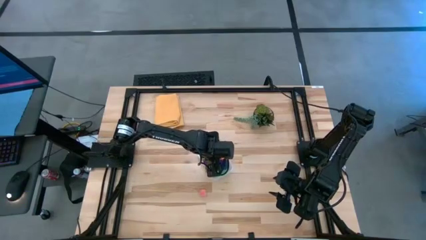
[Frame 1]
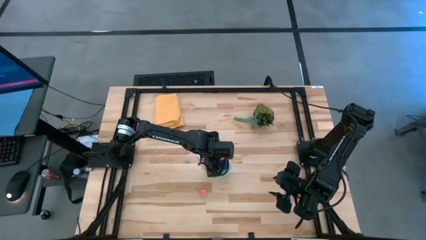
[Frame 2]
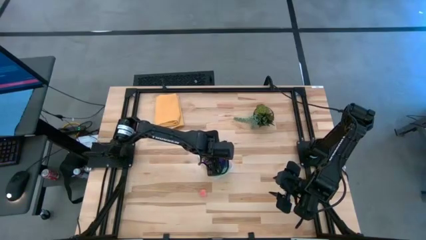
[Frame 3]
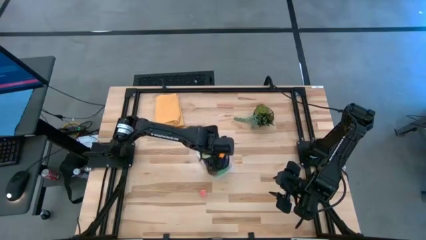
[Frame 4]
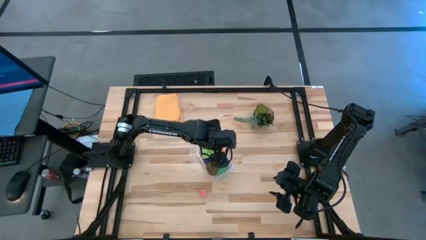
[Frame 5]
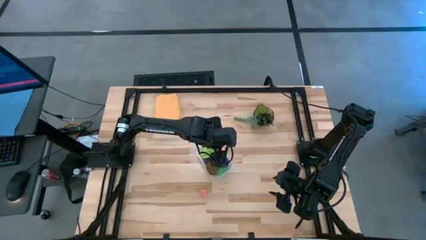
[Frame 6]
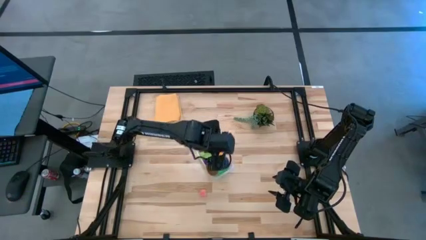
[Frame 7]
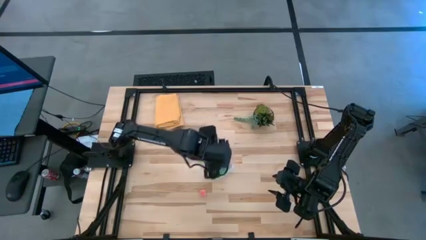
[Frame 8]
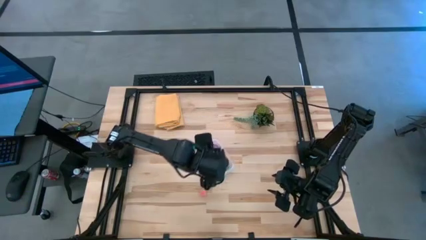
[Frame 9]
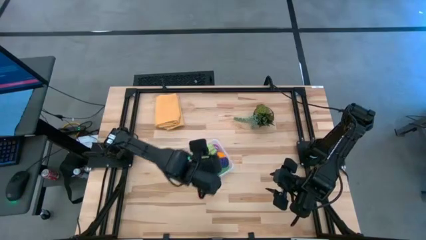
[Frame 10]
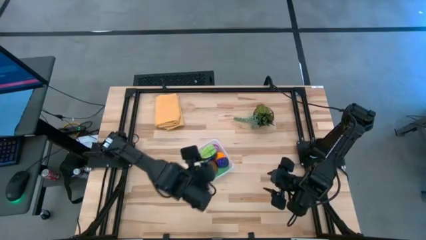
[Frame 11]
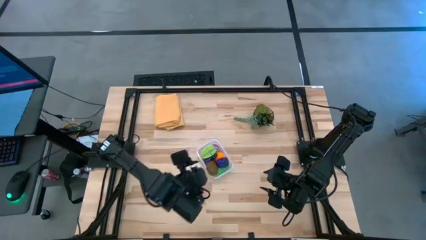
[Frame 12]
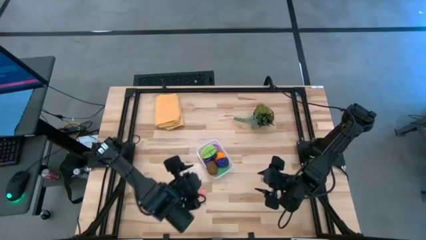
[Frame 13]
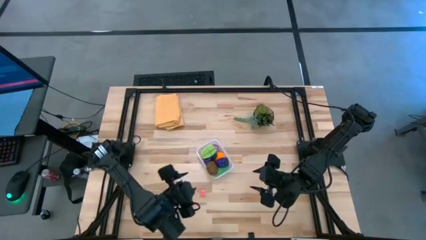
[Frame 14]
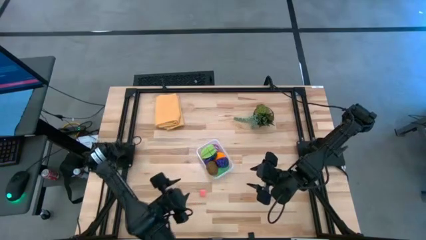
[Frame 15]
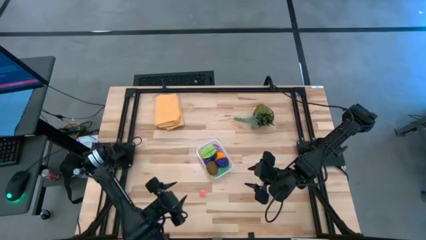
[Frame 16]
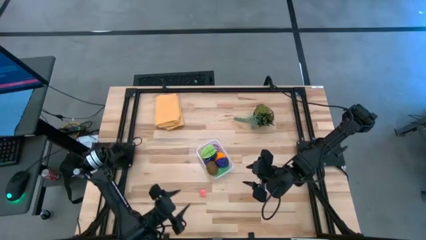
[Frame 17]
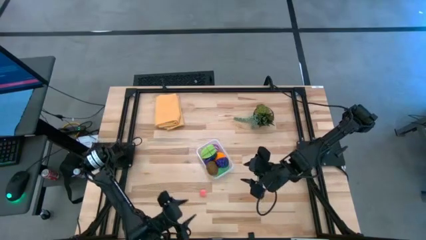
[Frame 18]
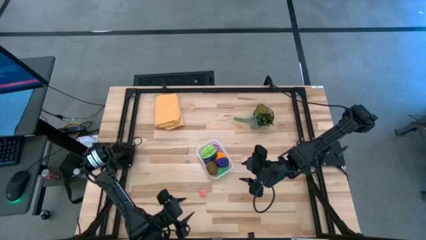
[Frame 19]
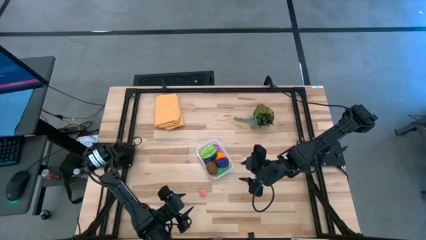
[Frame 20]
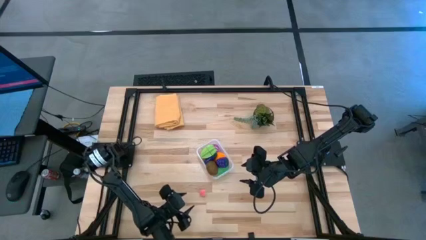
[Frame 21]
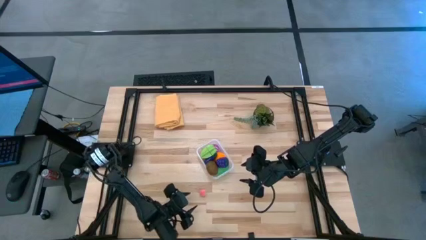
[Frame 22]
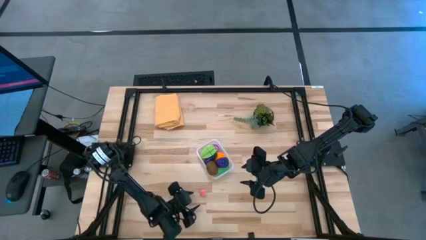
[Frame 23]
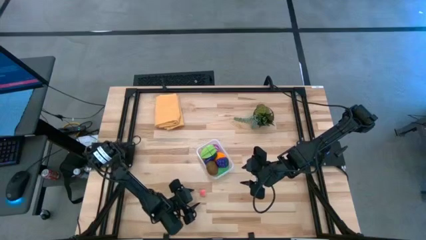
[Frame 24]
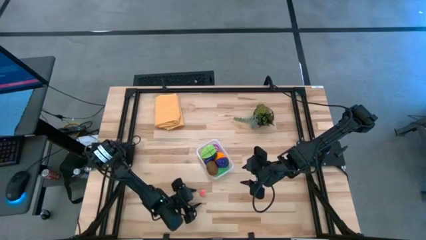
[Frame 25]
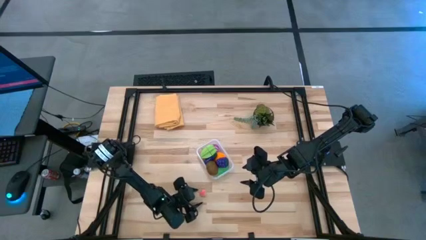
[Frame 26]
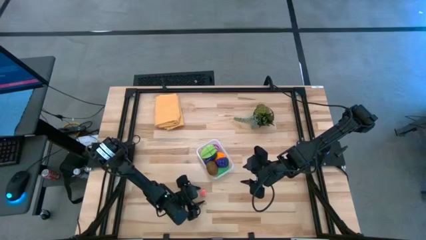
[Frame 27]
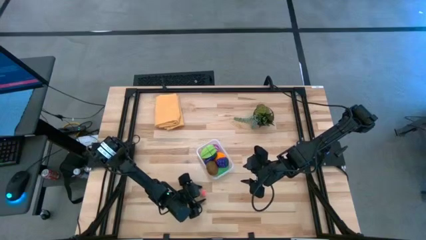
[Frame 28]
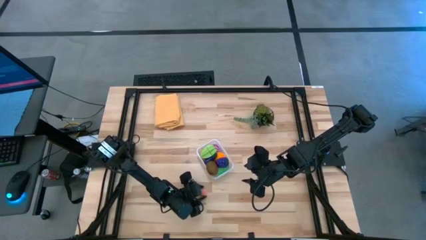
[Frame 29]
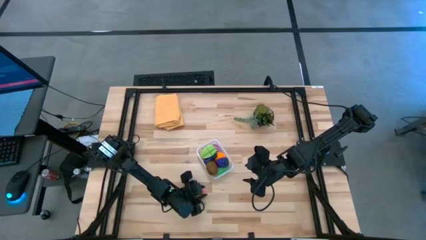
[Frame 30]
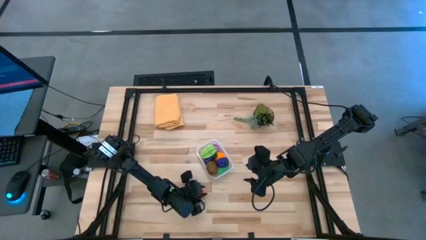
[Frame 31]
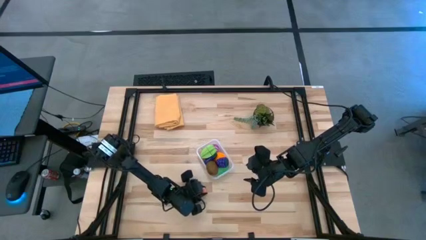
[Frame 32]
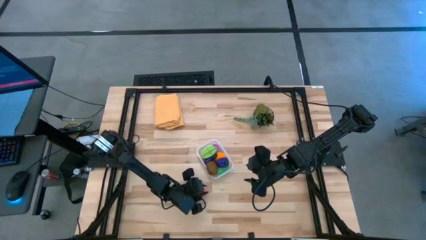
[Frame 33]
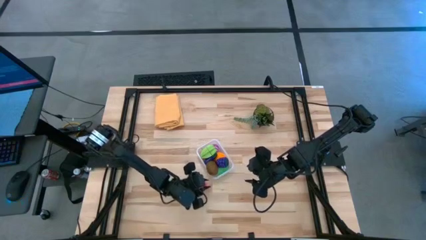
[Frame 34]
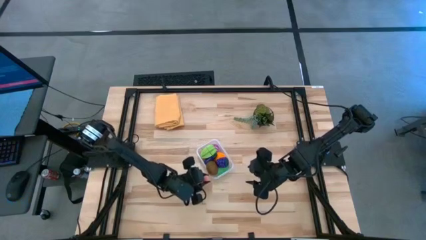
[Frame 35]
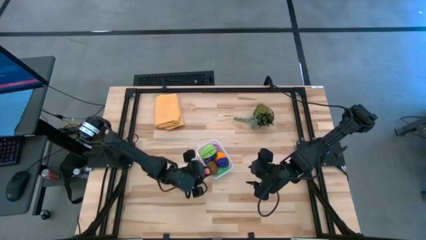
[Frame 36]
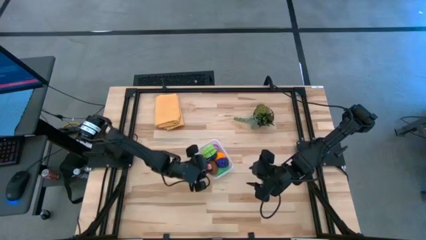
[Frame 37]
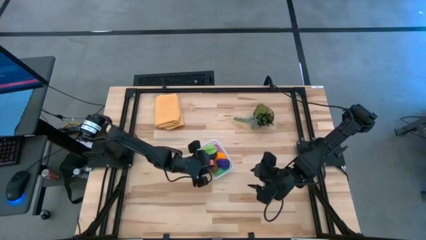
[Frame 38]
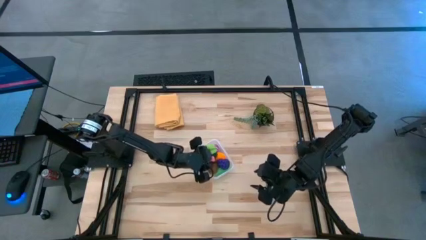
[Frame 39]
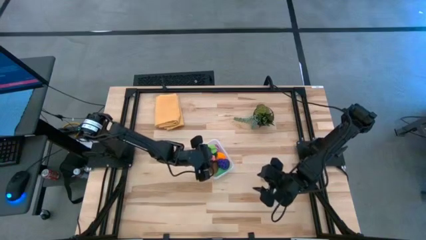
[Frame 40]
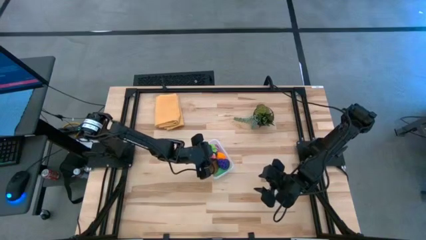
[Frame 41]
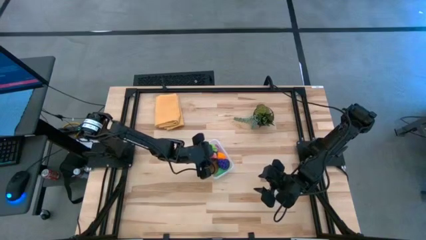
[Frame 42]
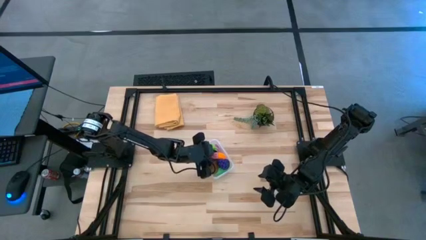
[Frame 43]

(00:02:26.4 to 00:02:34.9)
Task: Pick and placing Produce into tupperware
Put the pink peach into the transparent bin
